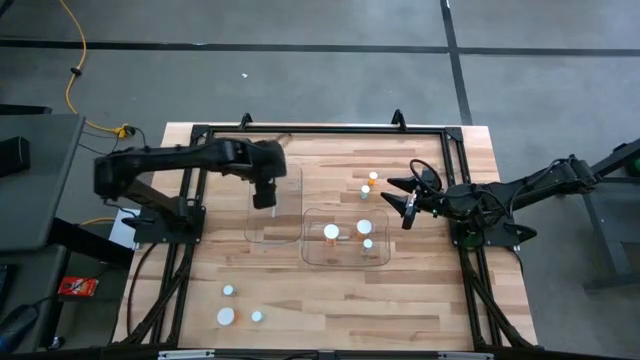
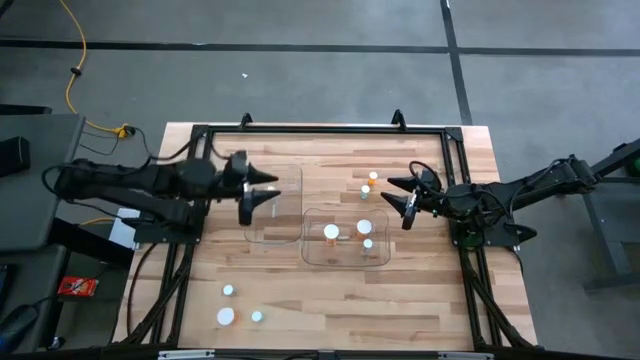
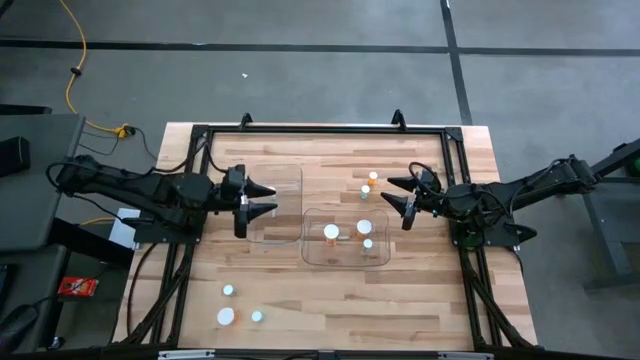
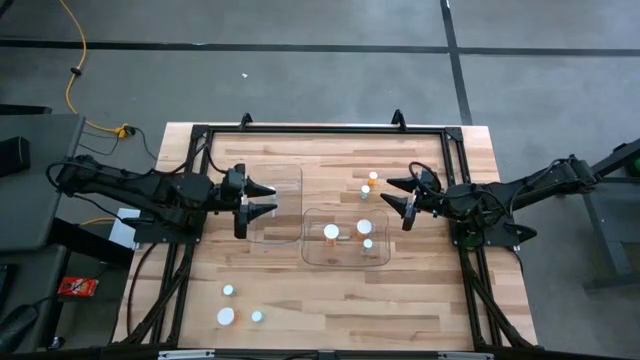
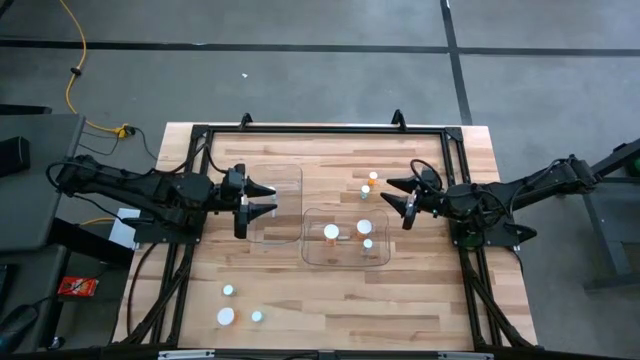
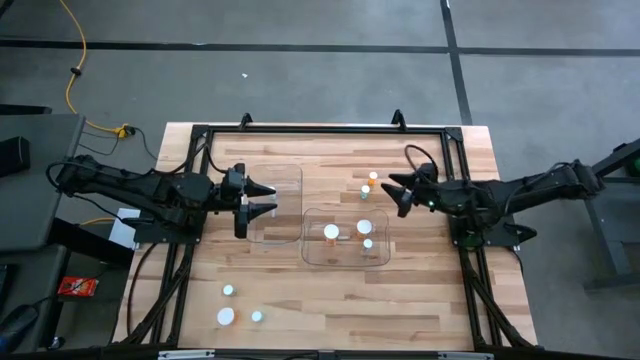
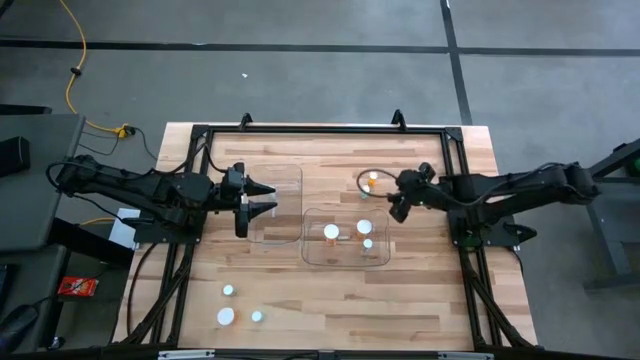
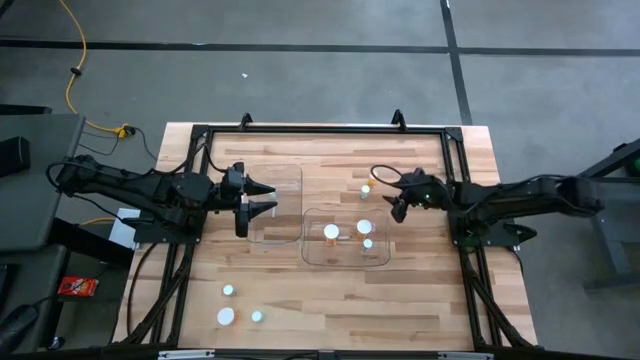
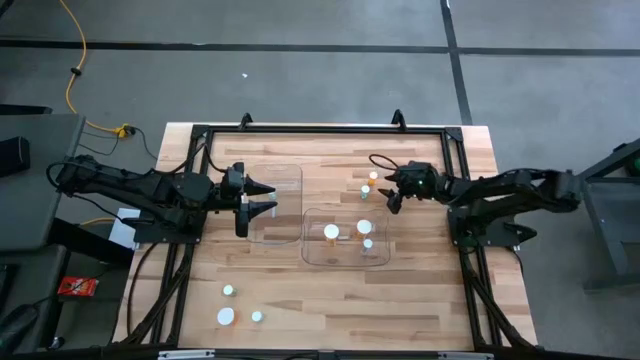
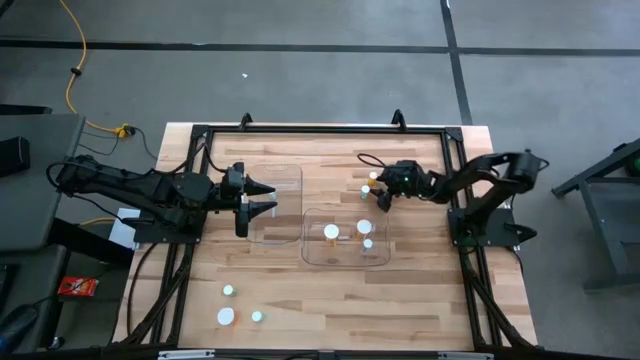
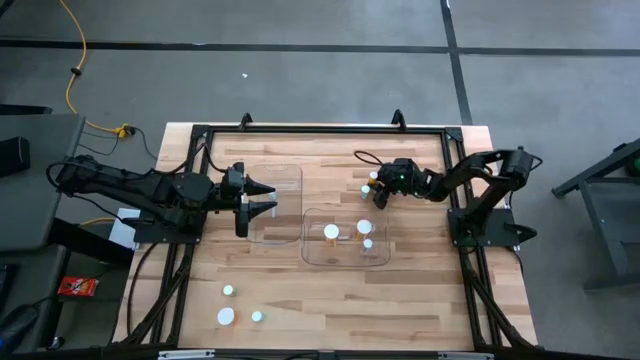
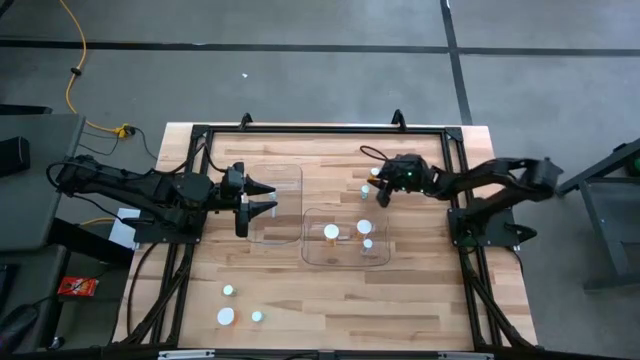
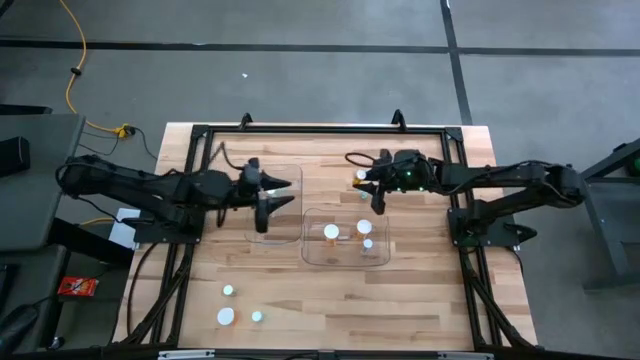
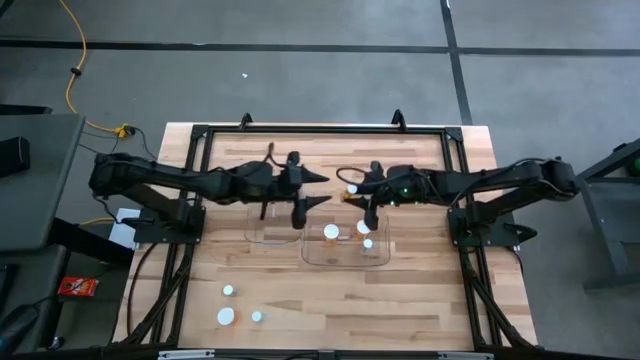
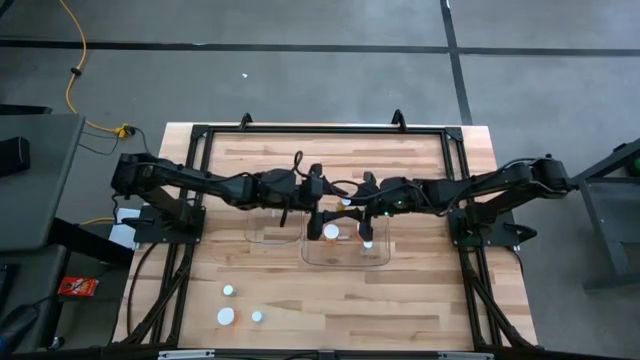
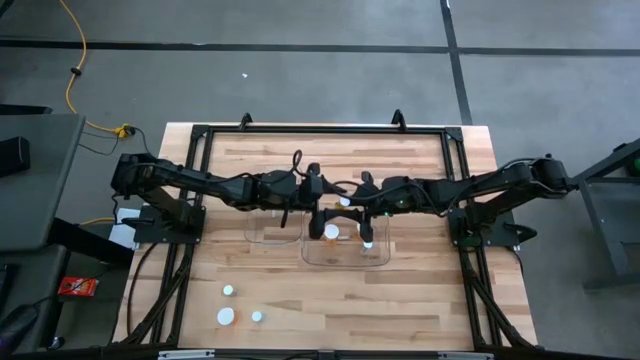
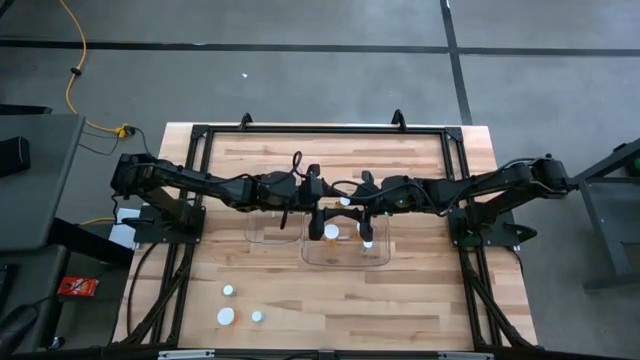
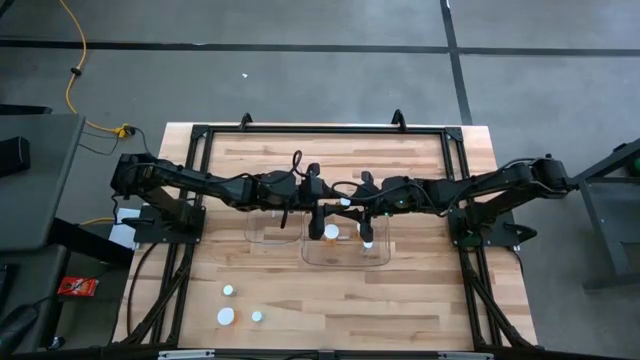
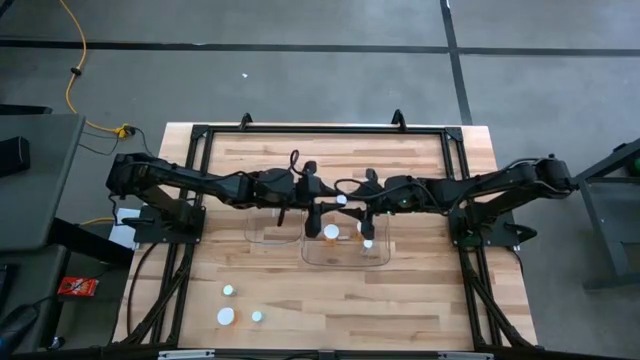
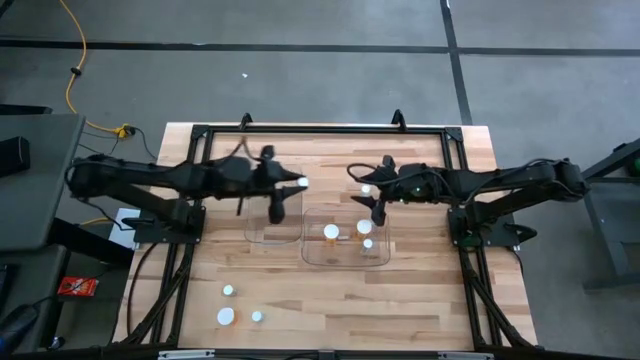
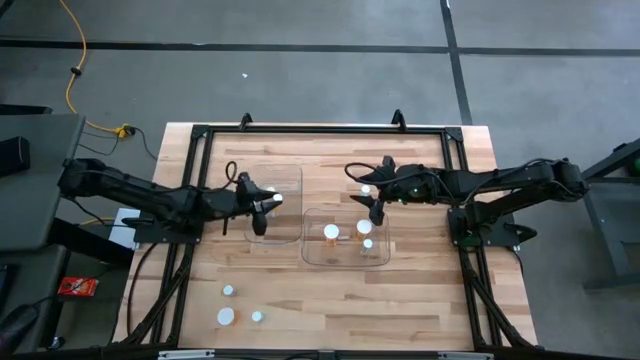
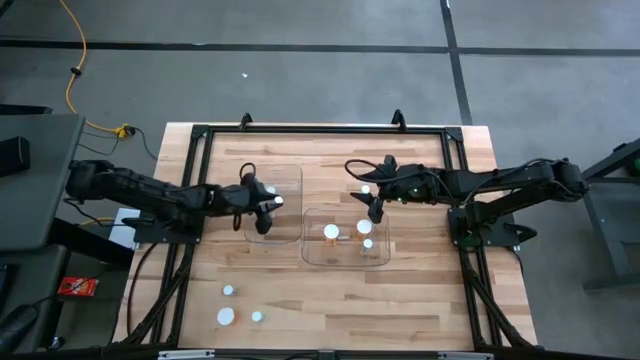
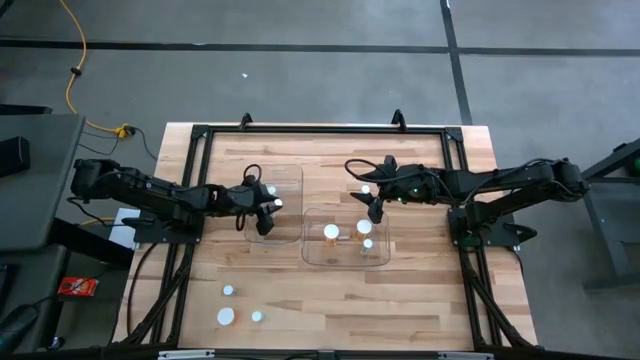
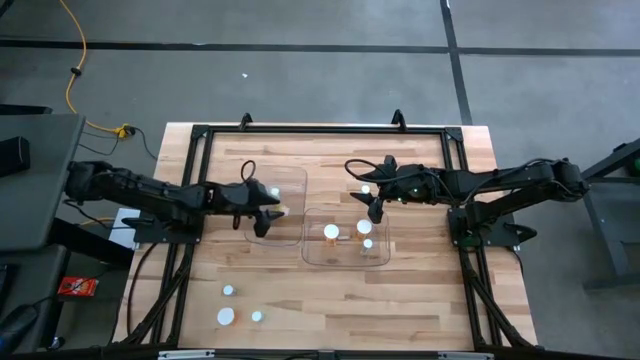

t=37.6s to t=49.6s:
Task: Pick and place medicine bottles into bin by pill shape (circle, oval)
Put the top orange tablet bottle into the left transparent bin

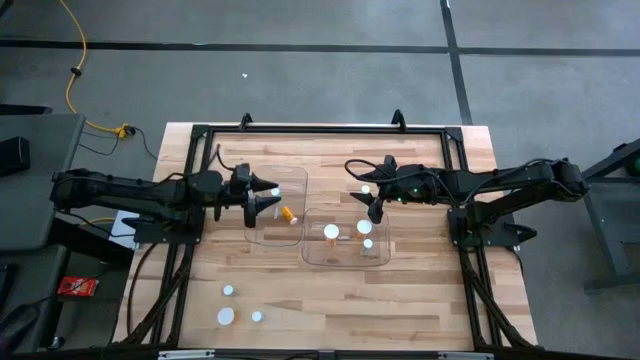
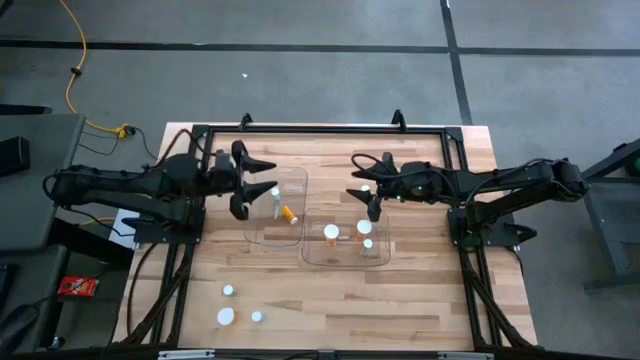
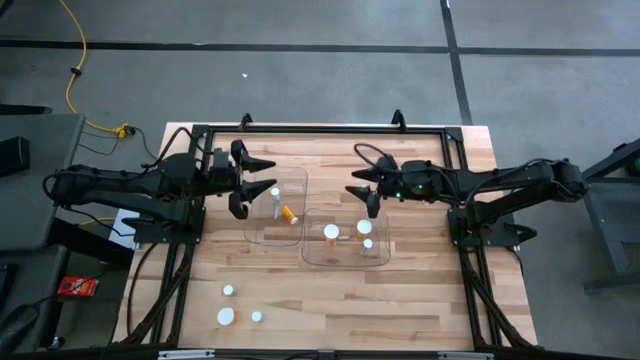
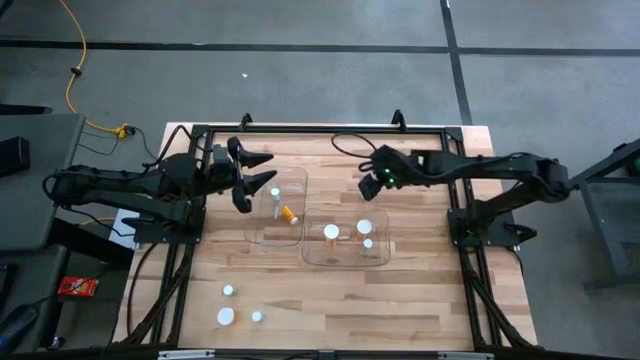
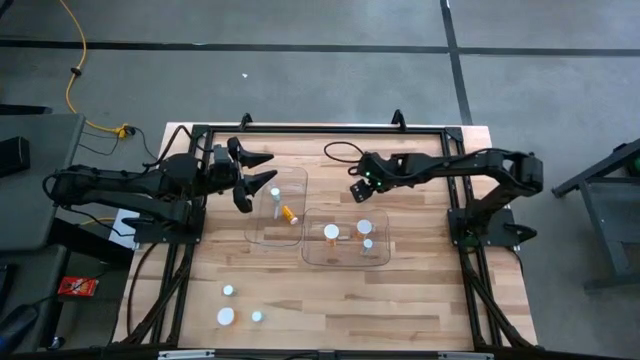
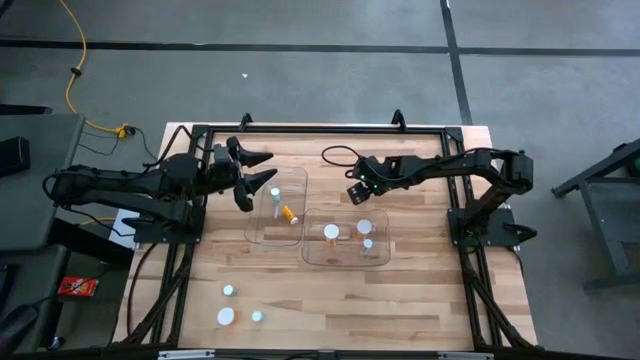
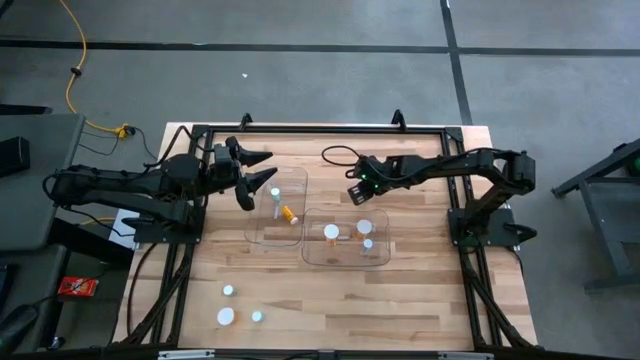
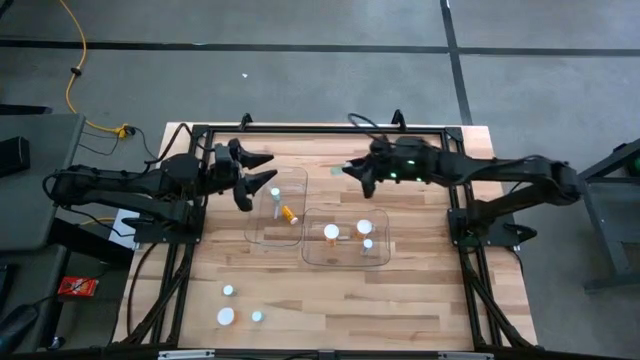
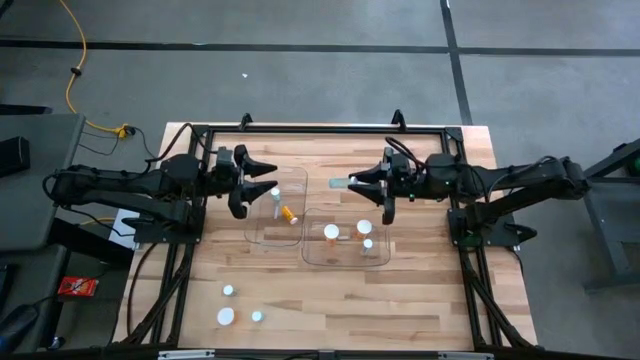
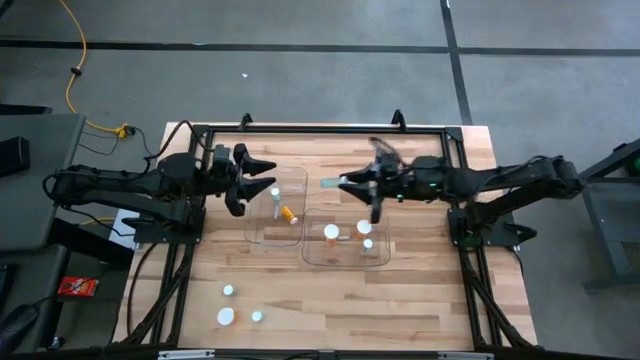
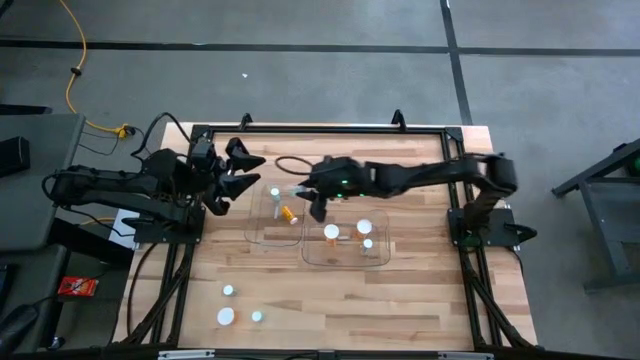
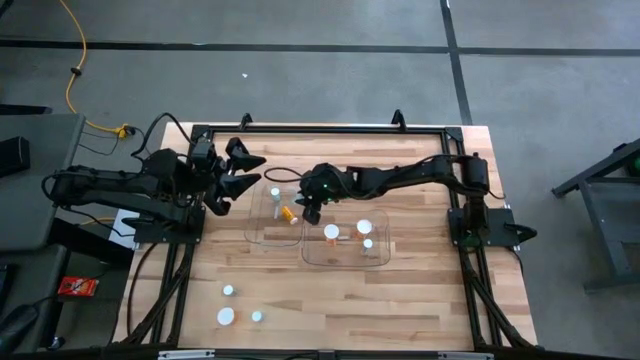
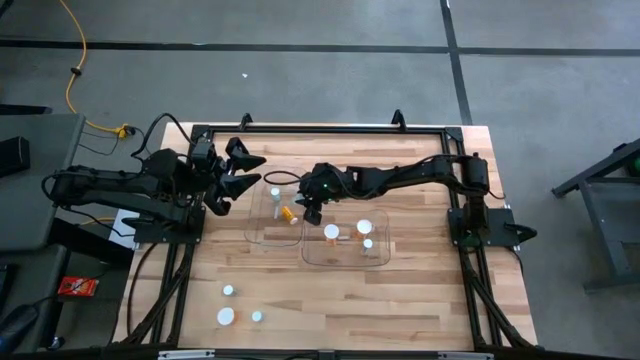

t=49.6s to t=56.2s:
Put the top blue tablet bottle into the left transparent bin

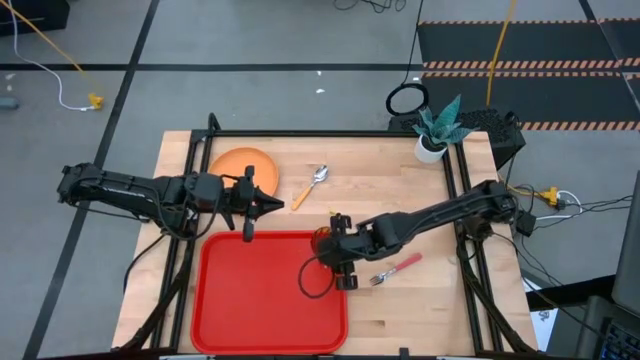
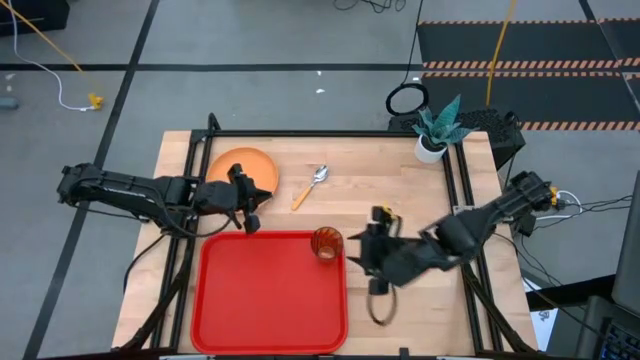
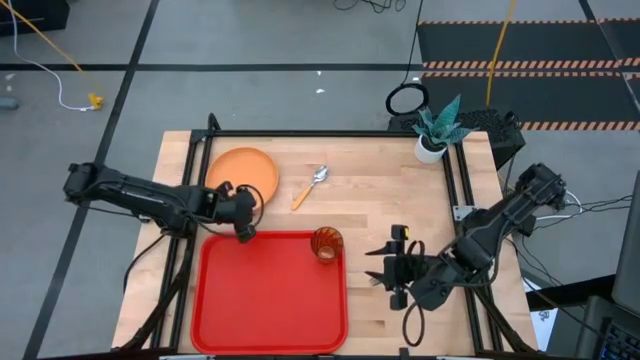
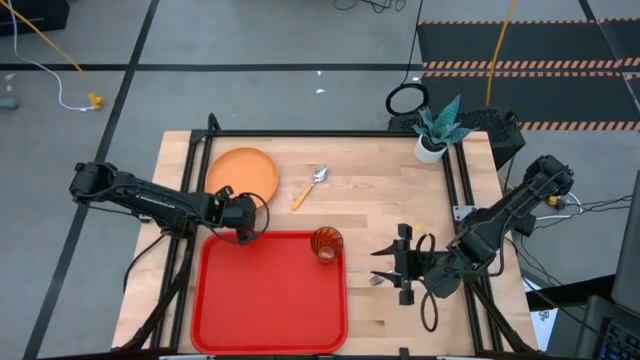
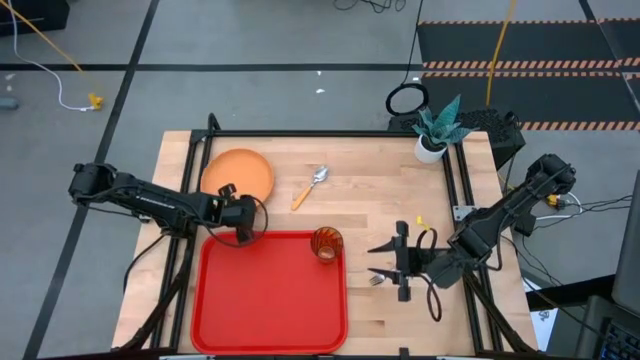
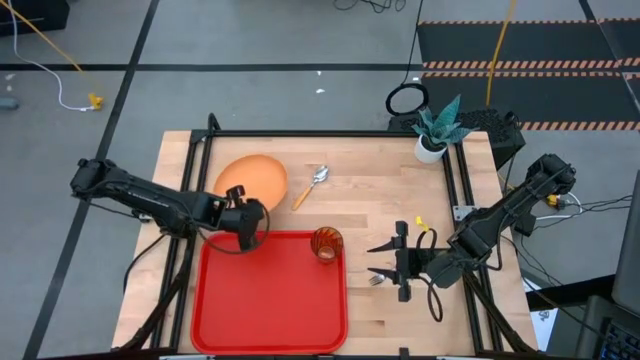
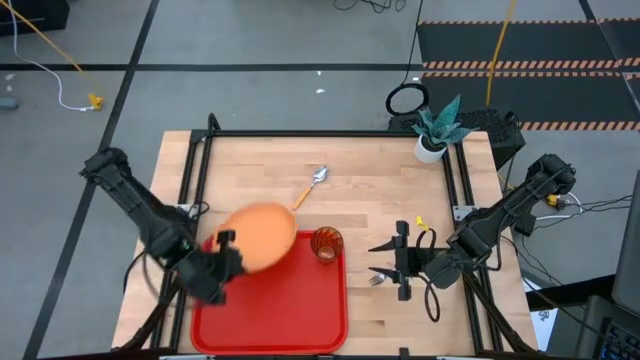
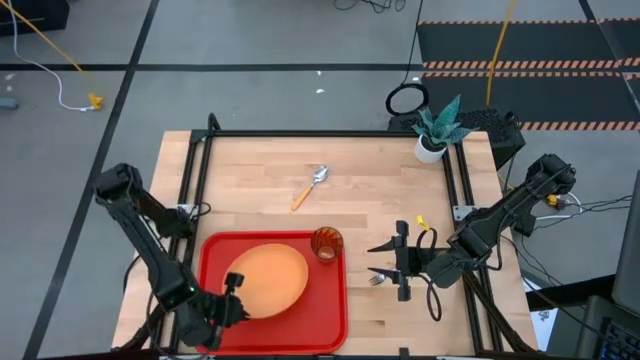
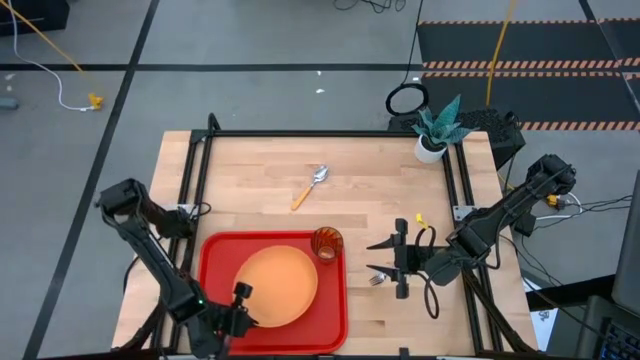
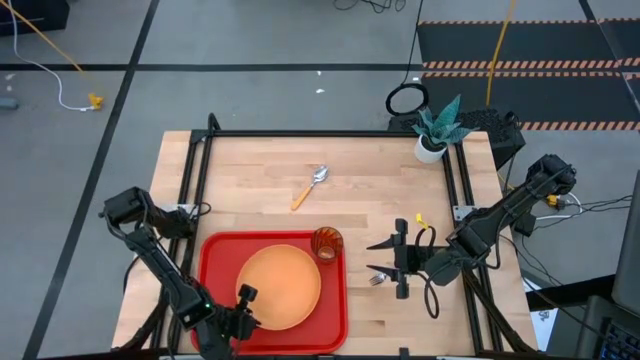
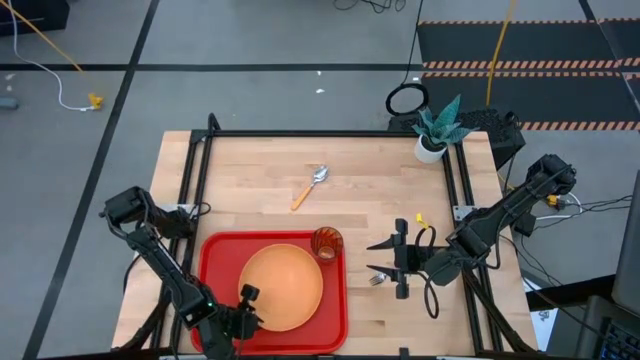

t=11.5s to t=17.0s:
Task: Pick and place plate/cup/fork/spoon on tray
Put the orange plate on the red serving tray to the bottom of the orange cup
